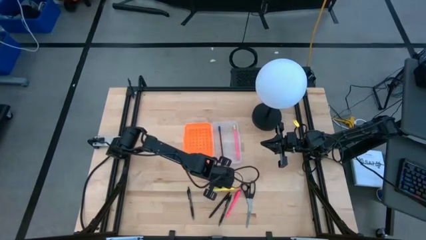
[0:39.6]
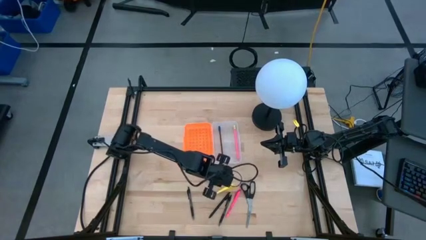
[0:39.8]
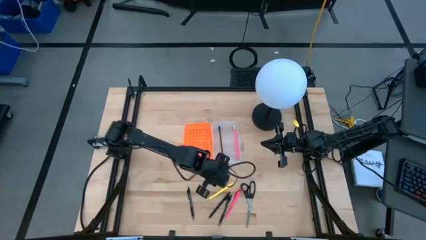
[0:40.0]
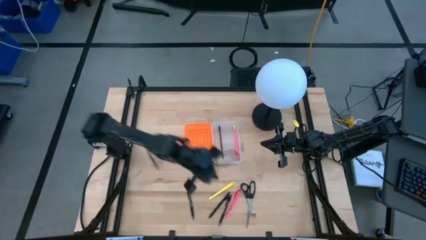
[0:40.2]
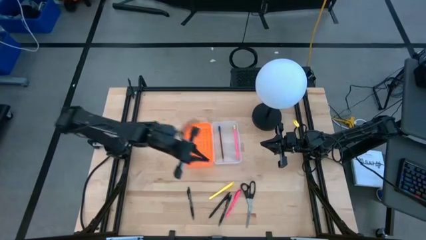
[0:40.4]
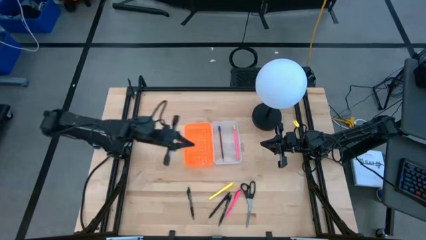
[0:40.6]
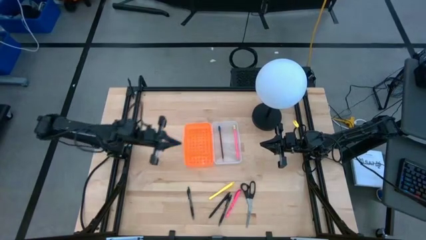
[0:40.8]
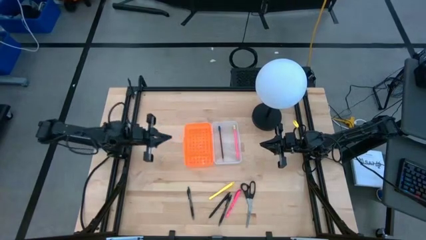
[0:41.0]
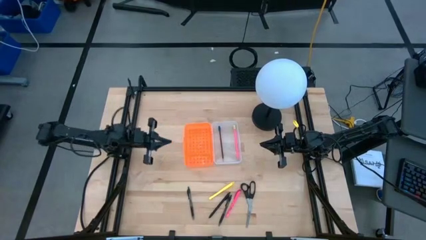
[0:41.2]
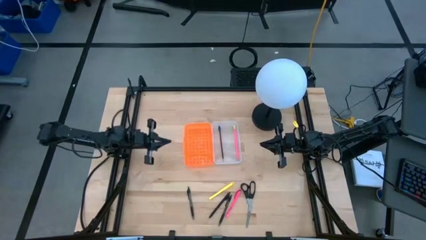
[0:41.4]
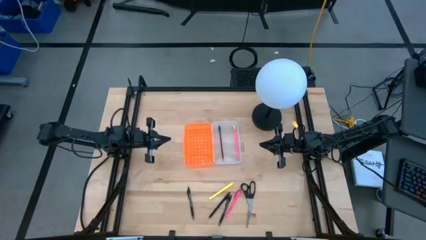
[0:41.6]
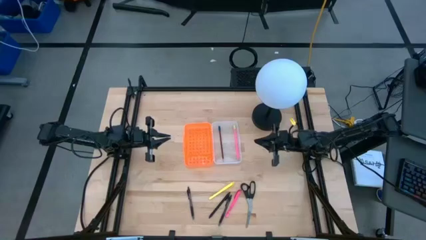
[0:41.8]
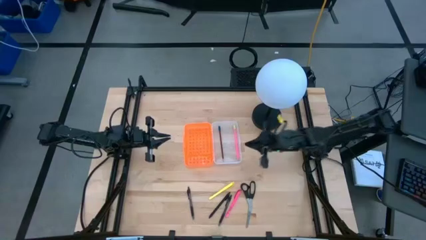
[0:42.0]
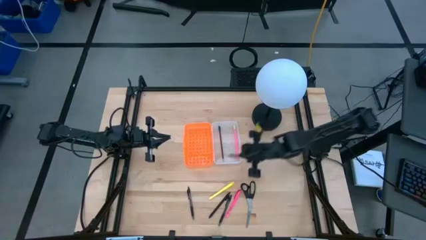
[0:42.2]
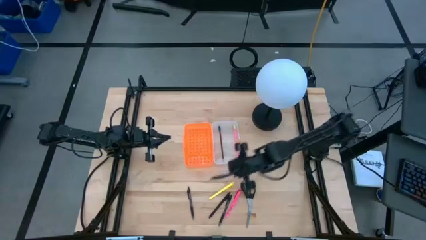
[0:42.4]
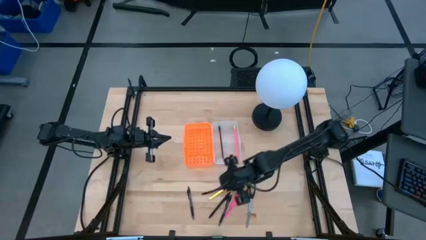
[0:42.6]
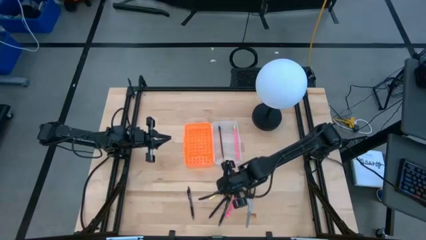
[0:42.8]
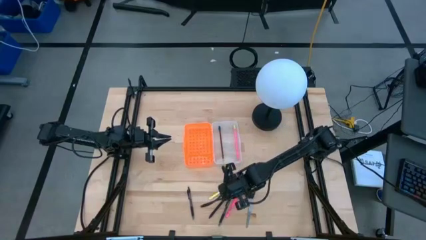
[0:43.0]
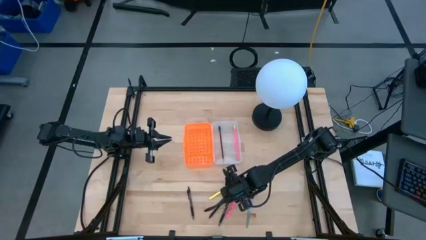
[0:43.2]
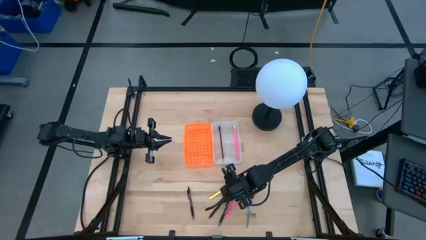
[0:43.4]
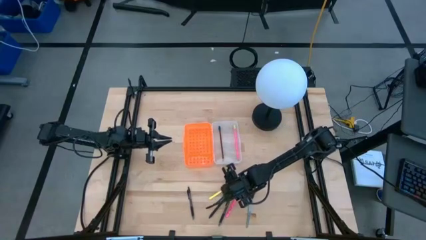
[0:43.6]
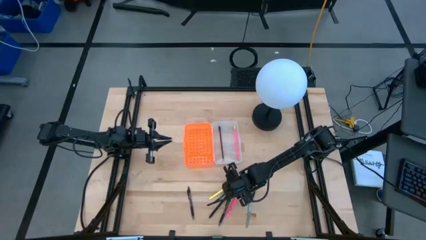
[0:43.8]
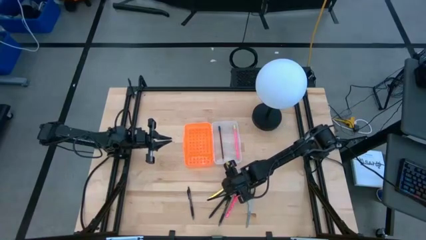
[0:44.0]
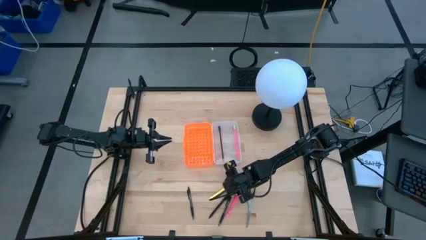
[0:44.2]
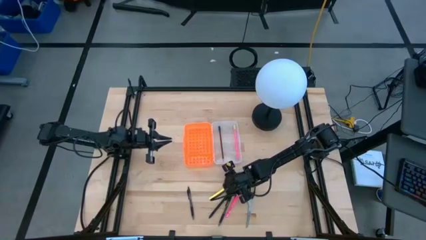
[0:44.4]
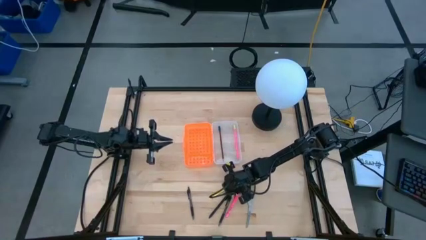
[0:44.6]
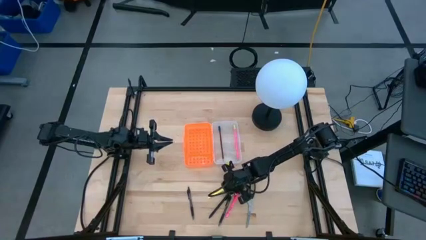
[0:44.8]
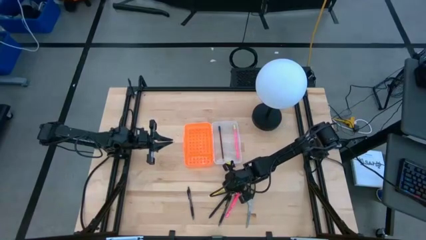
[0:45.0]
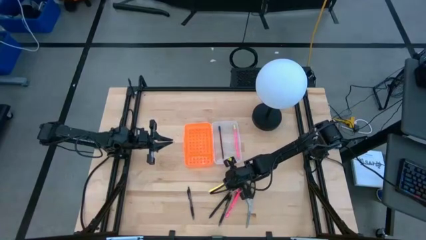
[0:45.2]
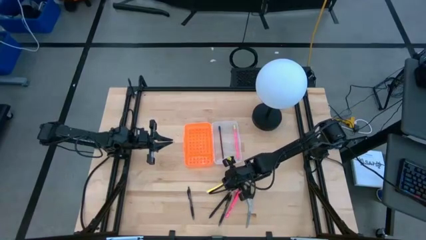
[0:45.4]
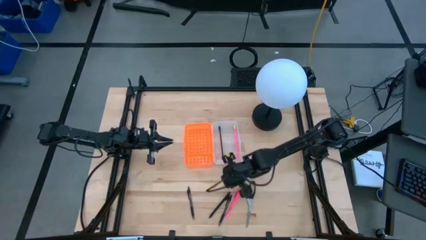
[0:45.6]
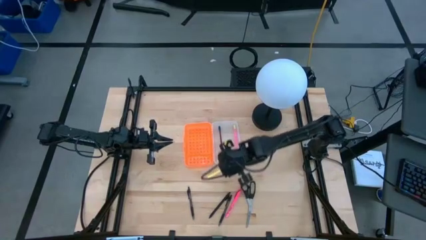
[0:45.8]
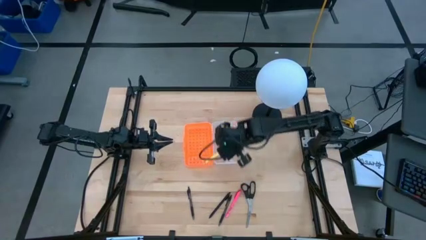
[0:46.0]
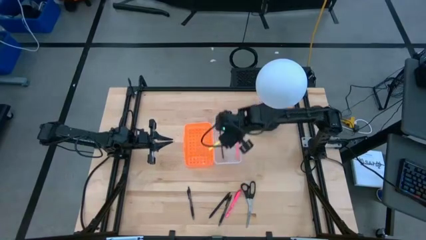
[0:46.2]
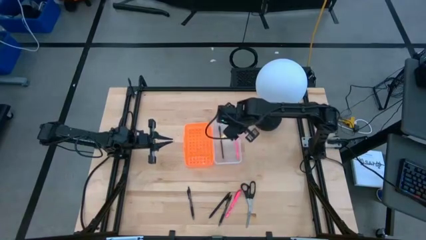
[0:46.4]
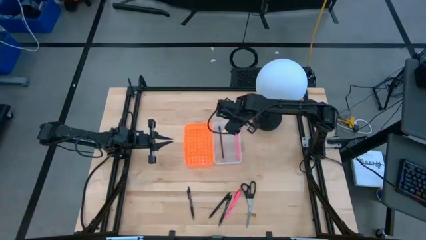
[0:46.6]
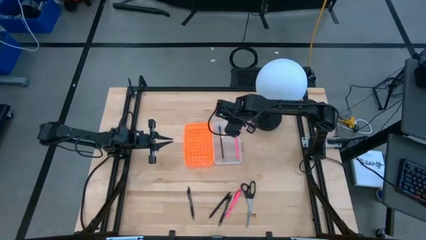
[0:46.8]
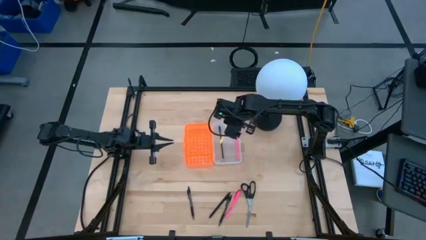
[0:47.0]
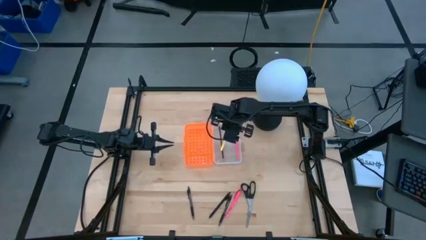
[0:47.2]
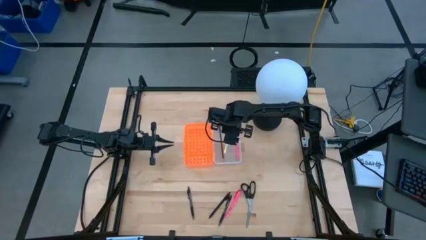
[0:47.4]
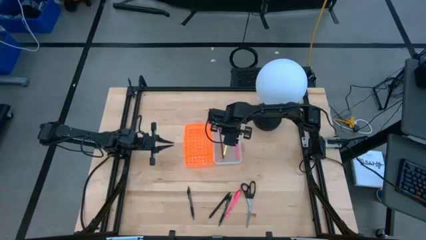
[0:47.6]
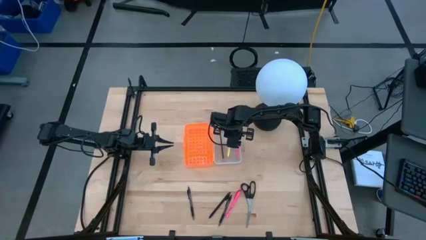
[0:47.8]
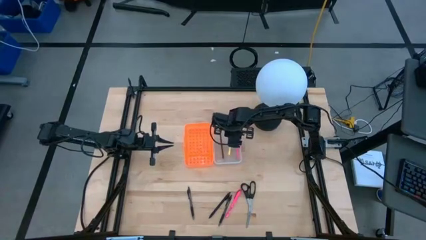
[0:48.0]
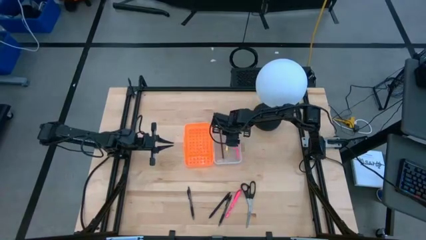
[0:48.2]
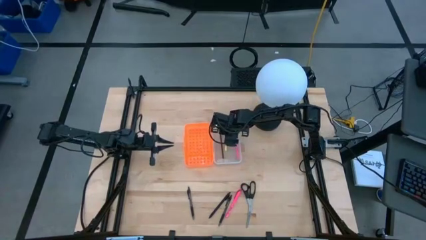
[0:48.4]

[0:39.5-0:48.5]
Task: Pick & place school supplies into a supply box
Put the yellow pen into the orange supply box

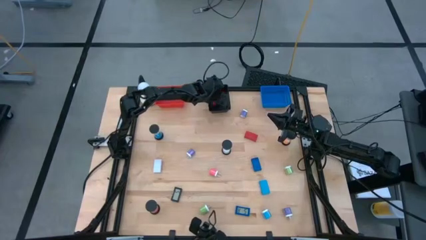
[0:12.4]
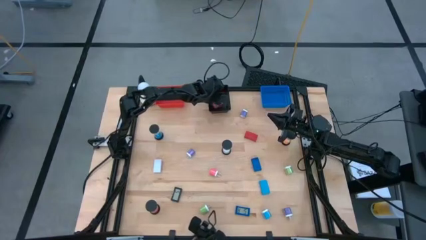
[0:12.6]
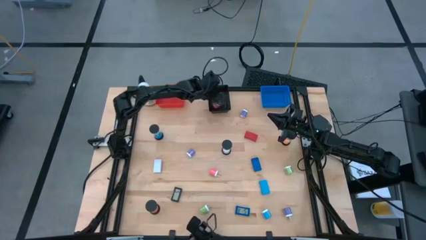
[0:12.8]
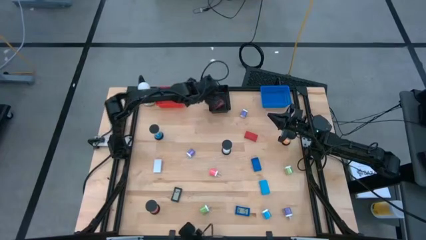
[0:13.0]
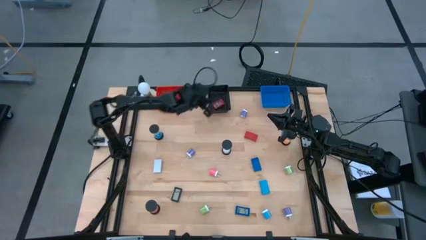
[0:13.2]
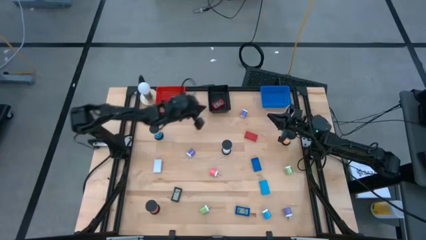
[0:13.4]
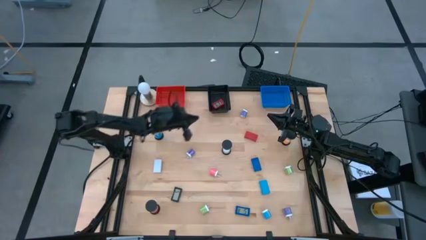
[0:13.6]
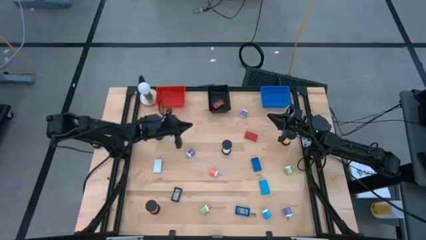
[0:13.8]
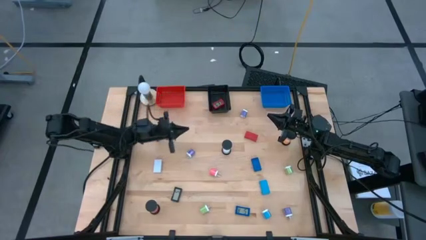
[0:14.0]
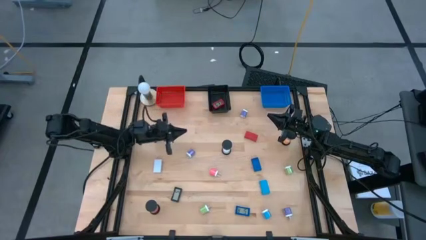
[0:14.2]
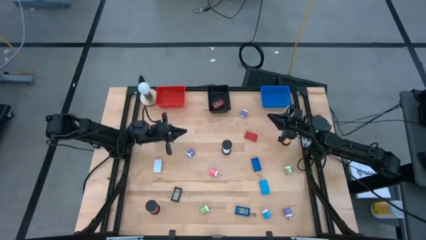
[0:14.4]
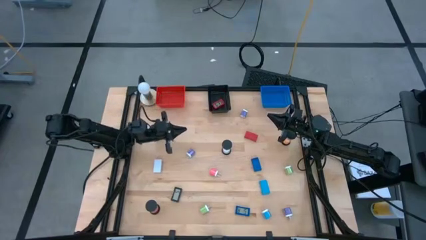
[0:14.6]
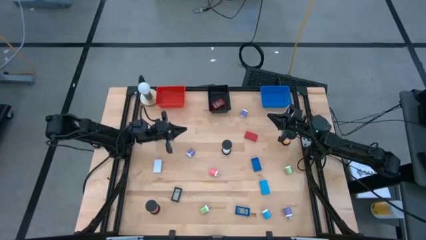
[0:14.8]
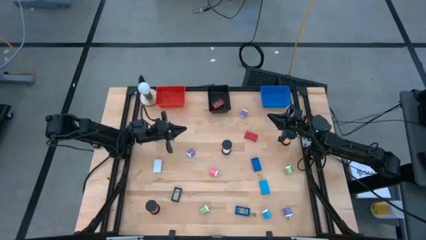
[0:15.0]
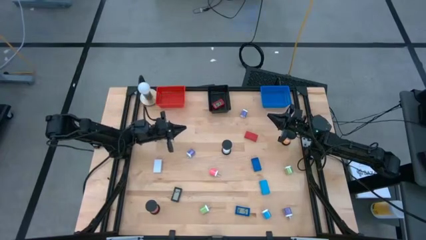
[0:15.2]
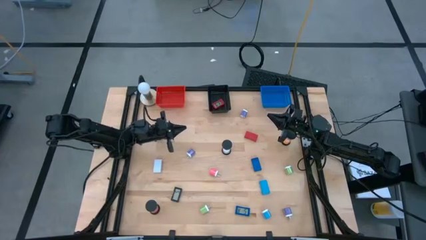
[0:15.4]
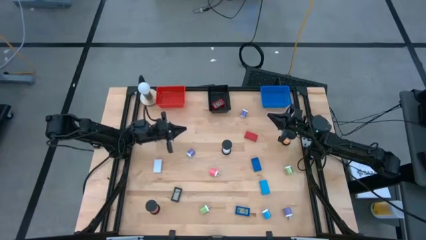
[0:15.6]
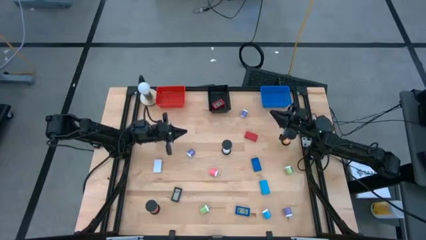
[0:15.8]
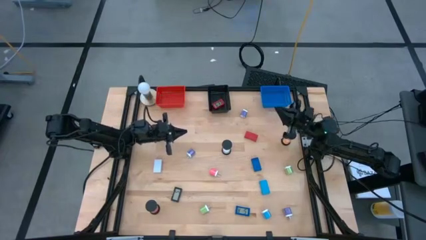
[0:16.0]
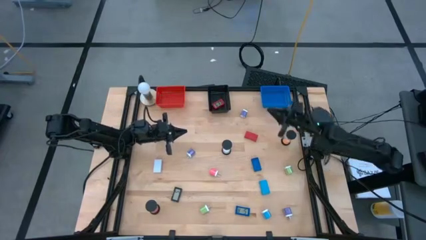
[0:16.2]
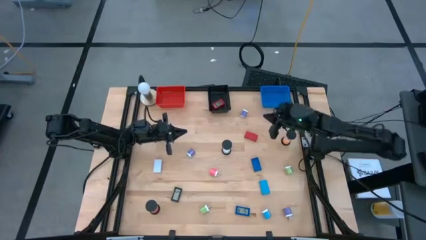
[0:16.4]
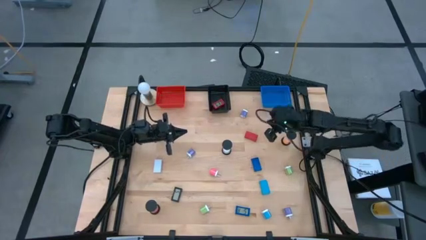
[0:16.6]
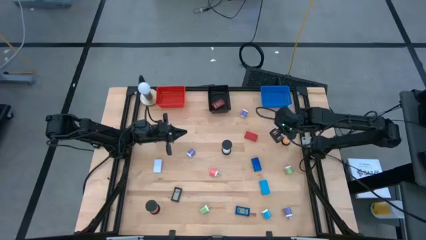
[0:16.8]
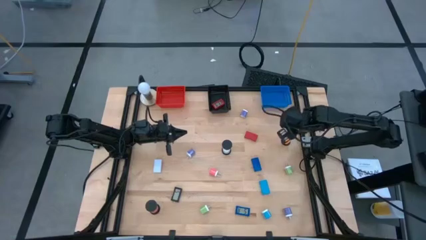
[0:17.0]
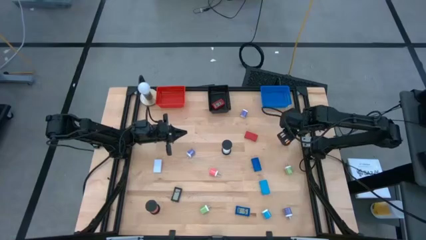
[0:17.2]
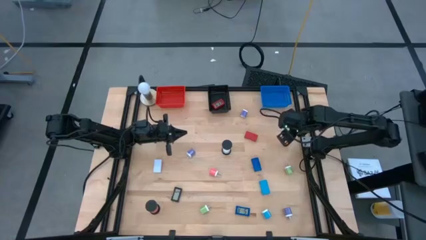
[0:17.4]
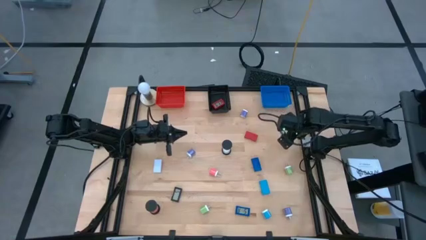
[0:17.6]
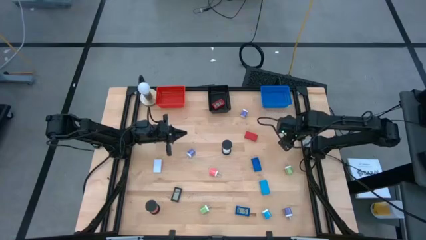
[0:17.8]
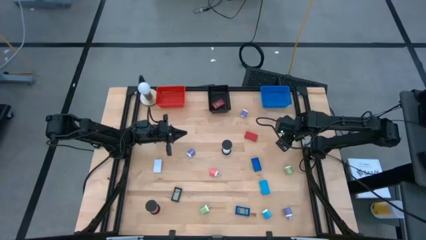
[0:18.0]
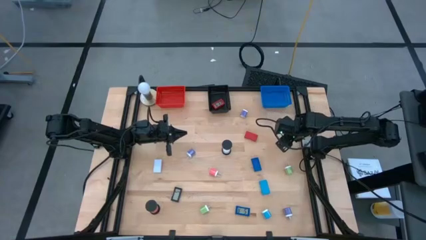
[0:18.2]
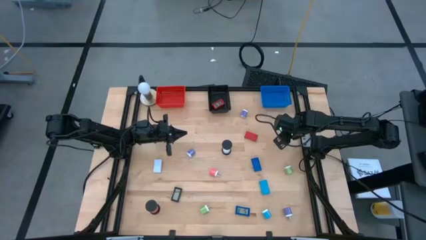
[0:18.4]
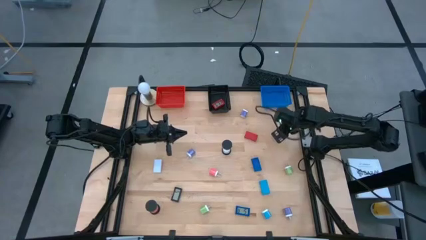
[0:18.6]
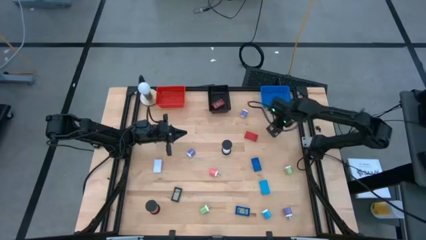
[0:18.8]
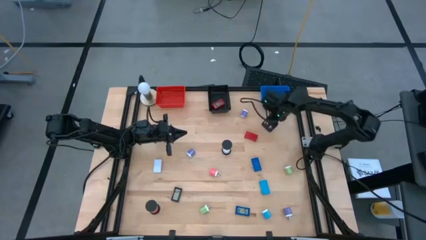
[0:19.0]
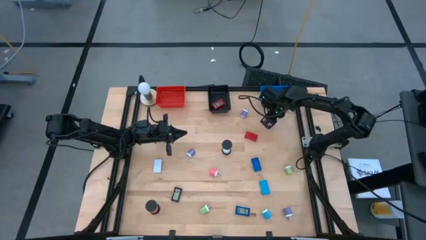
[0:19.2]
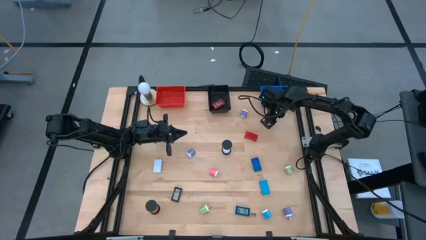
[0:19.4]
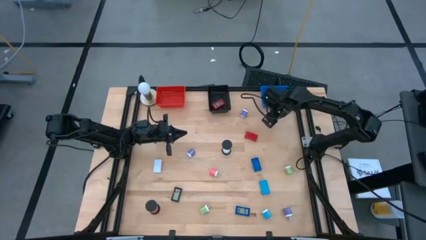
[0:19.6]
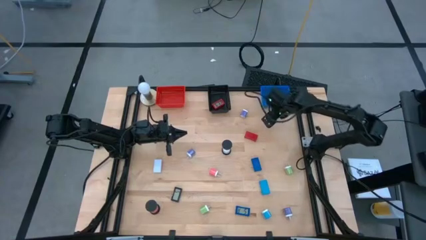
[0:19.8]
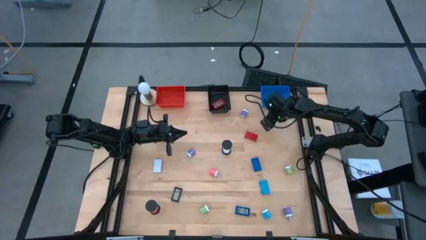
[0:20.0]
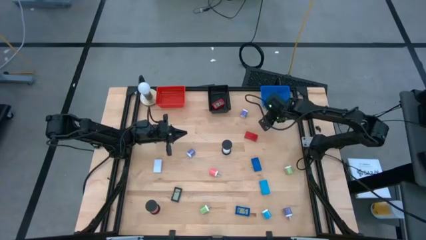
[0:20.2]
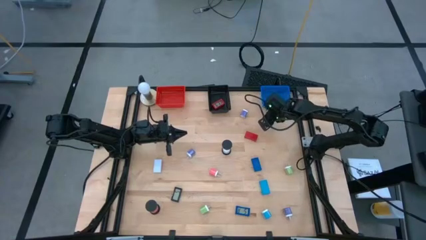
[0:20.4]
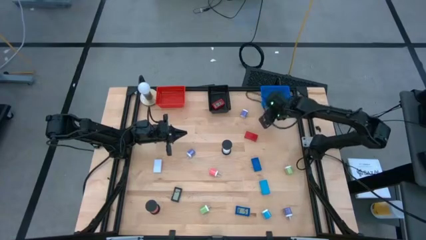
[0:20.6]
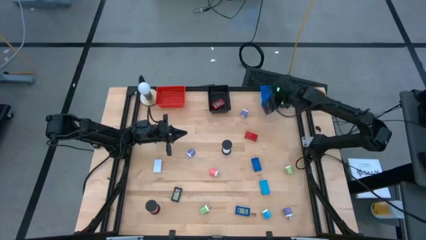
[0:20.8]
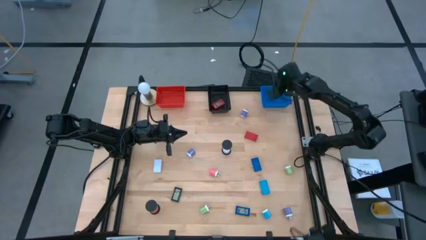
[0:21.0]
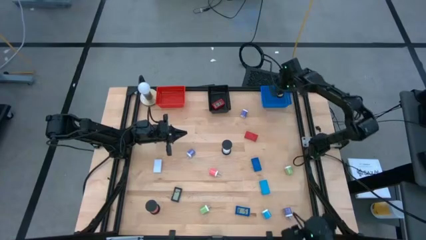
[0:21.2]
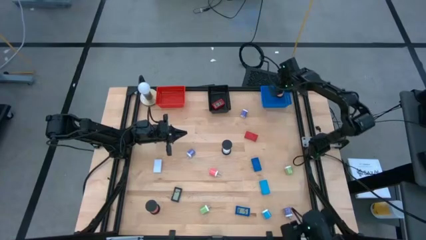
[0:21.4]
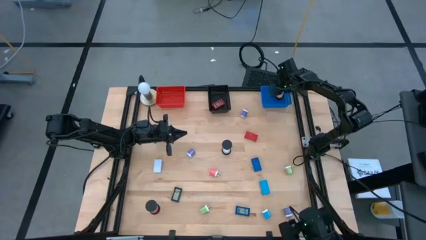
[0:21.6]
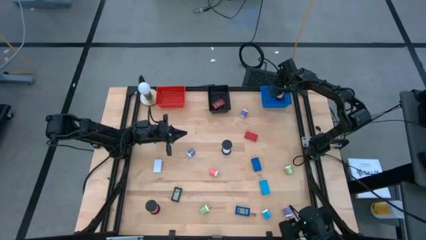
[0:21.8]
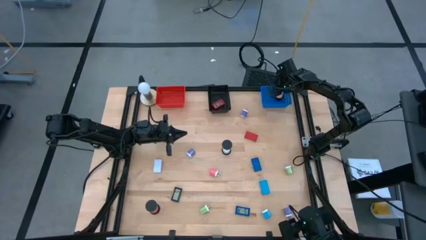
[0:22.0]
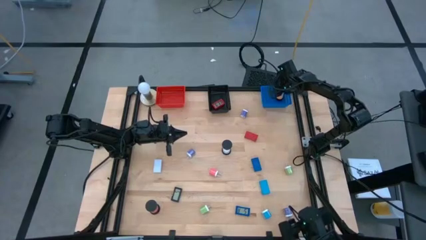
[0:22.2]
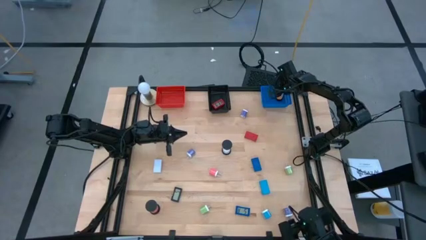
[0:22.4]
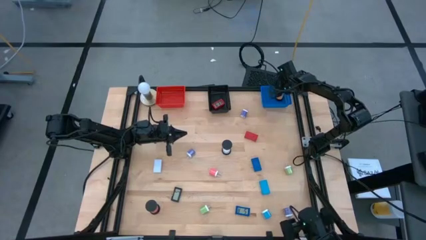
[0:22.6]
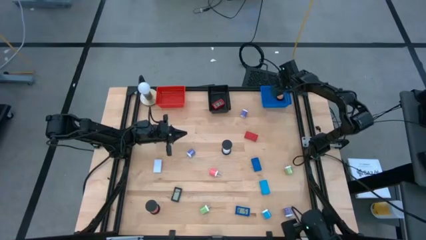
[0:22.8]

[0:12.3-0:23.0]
Task: Pick & Place Office items
Put the orange hourglass into the blue bin
